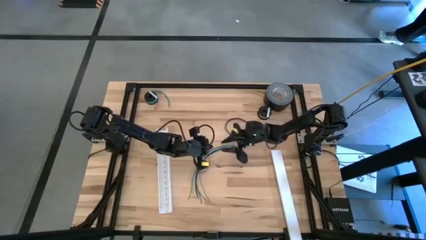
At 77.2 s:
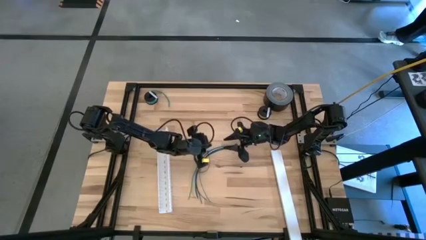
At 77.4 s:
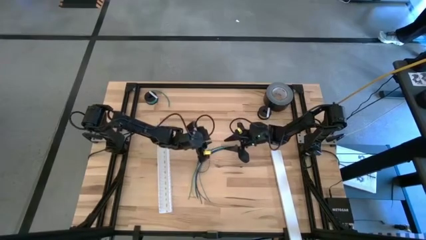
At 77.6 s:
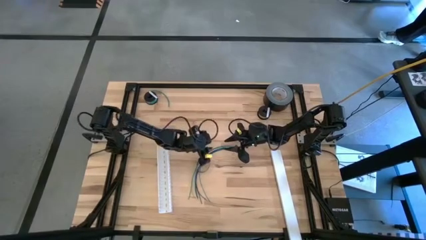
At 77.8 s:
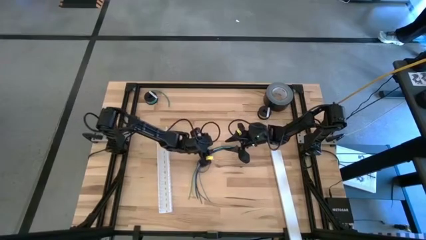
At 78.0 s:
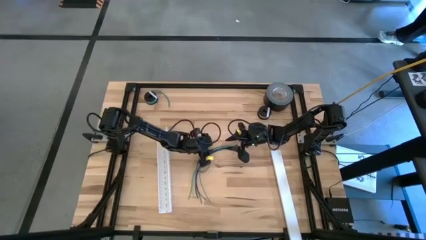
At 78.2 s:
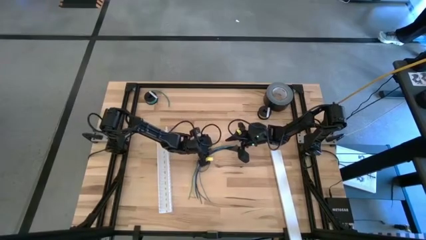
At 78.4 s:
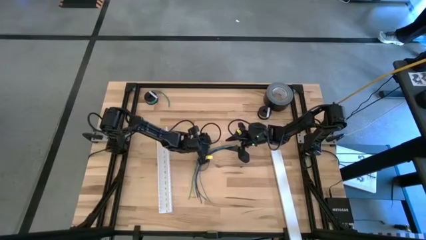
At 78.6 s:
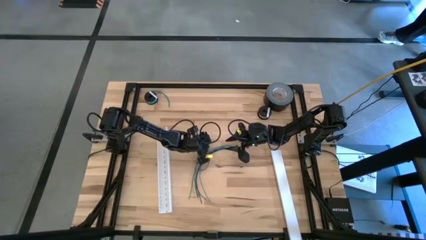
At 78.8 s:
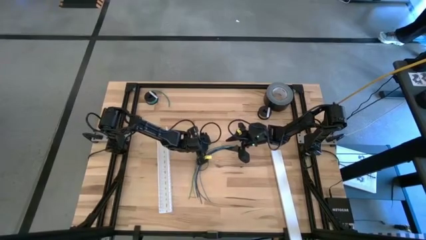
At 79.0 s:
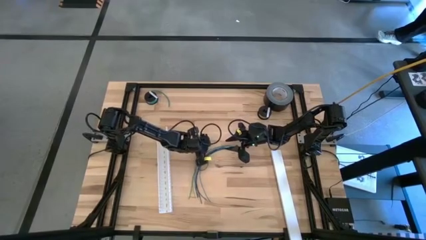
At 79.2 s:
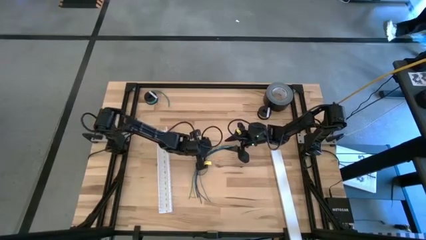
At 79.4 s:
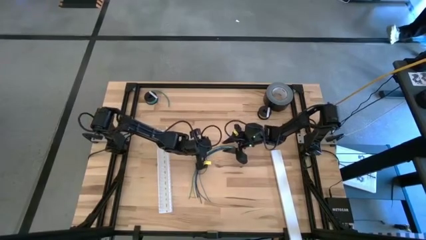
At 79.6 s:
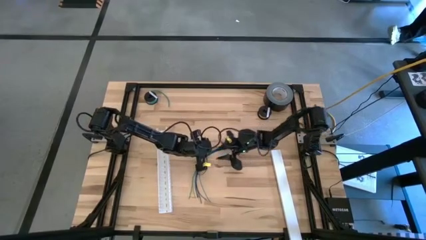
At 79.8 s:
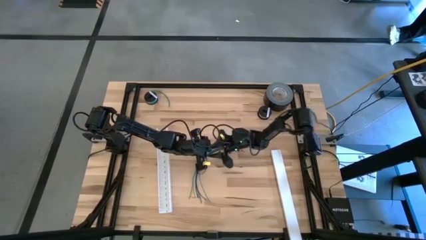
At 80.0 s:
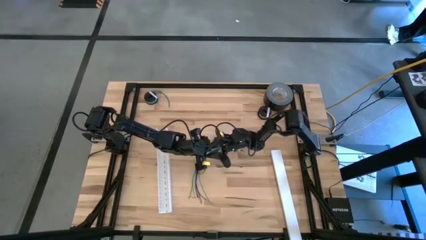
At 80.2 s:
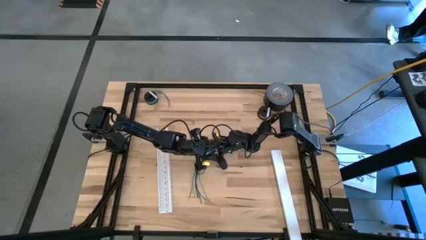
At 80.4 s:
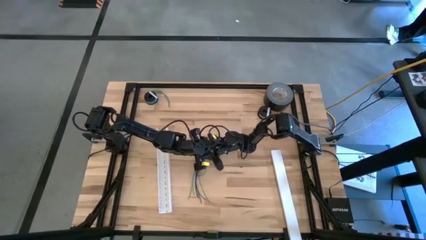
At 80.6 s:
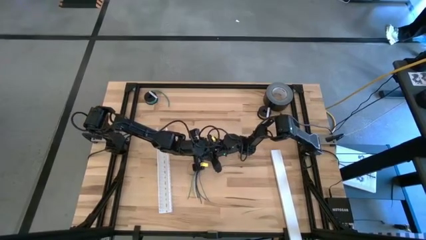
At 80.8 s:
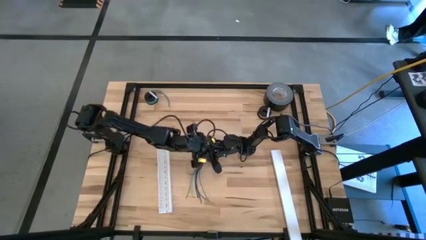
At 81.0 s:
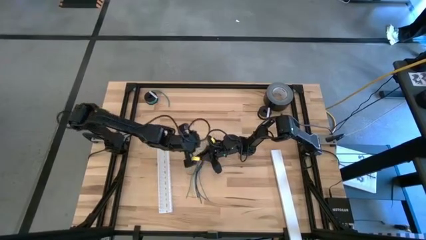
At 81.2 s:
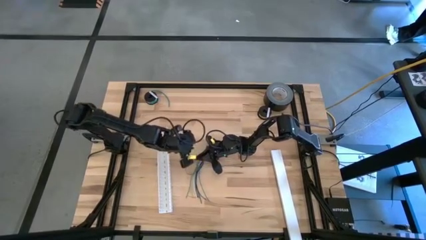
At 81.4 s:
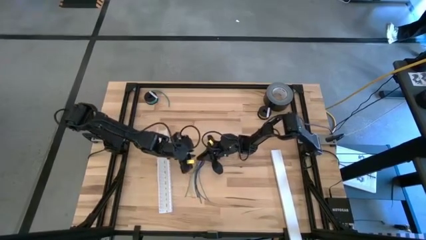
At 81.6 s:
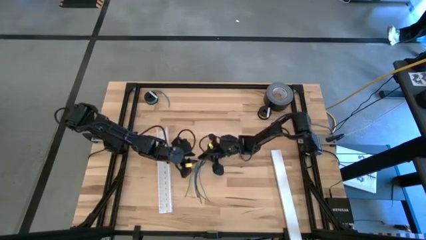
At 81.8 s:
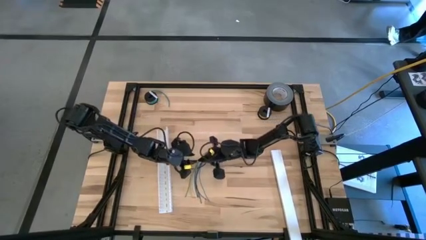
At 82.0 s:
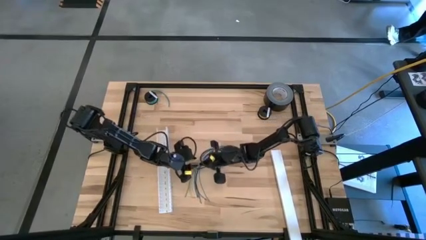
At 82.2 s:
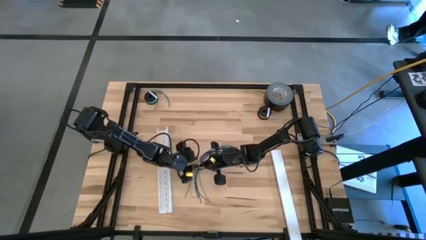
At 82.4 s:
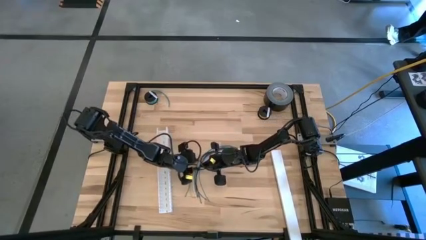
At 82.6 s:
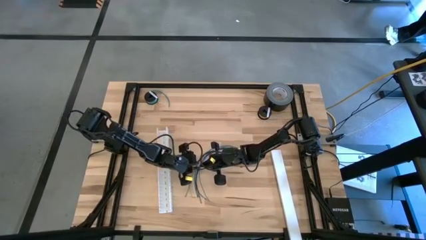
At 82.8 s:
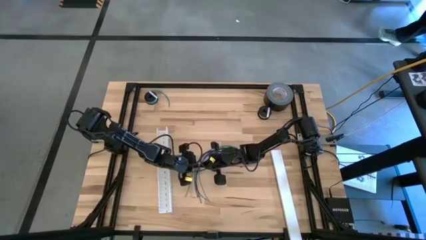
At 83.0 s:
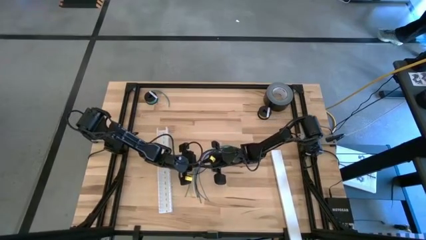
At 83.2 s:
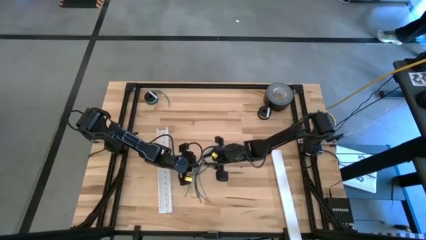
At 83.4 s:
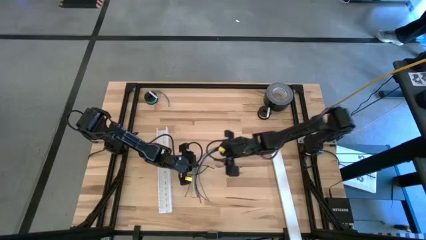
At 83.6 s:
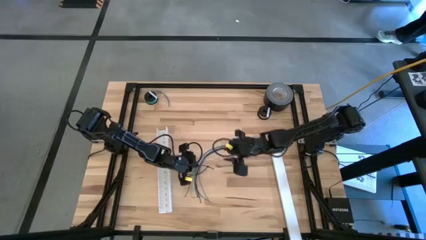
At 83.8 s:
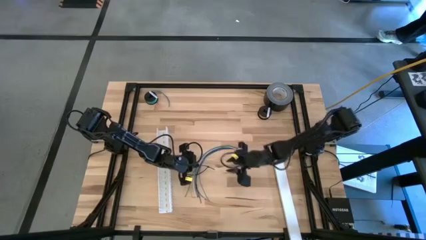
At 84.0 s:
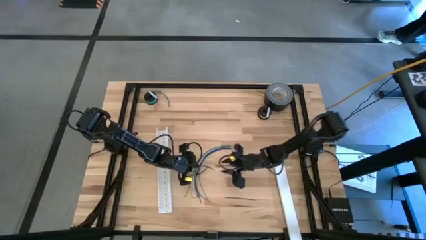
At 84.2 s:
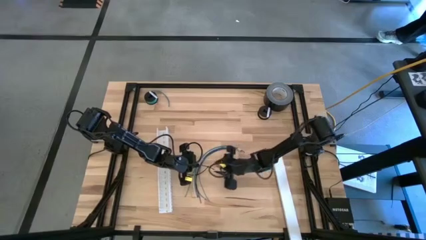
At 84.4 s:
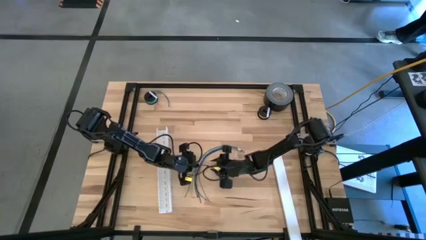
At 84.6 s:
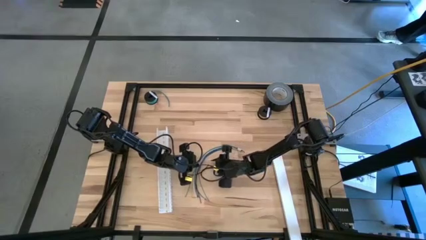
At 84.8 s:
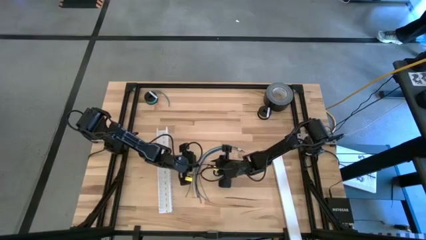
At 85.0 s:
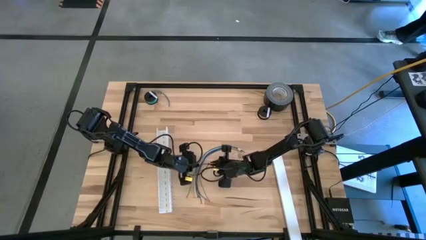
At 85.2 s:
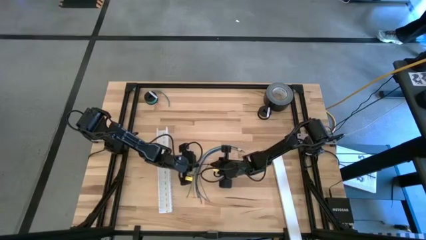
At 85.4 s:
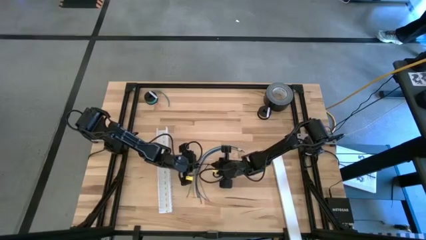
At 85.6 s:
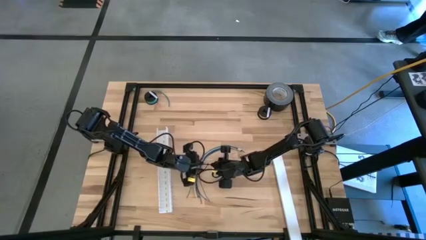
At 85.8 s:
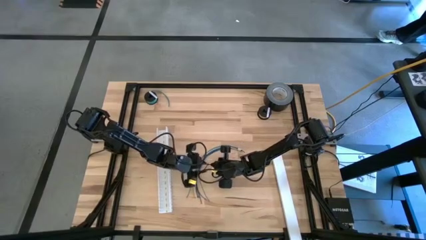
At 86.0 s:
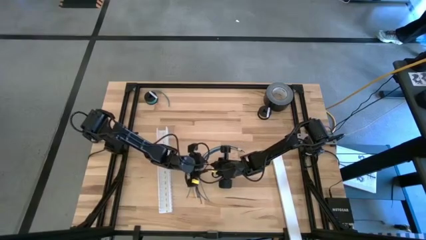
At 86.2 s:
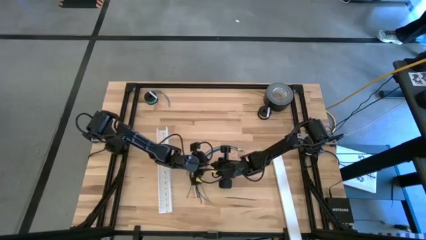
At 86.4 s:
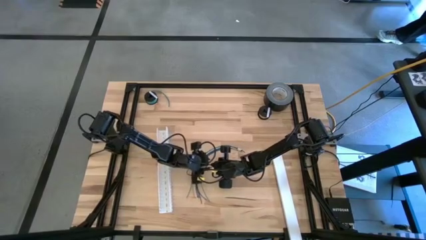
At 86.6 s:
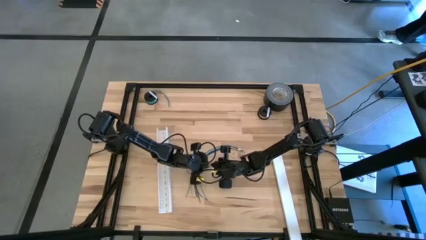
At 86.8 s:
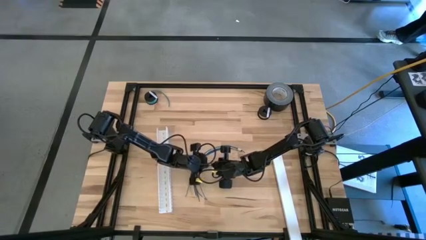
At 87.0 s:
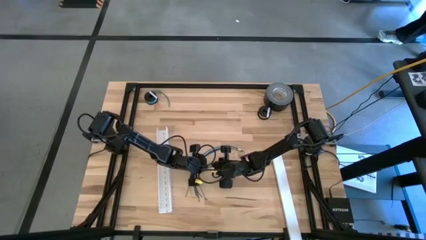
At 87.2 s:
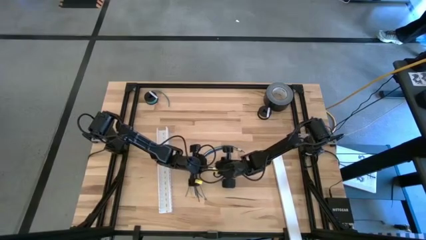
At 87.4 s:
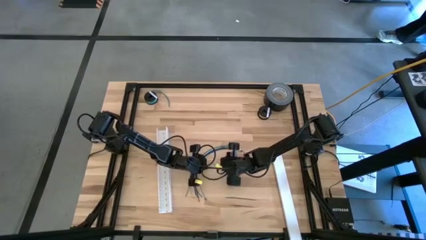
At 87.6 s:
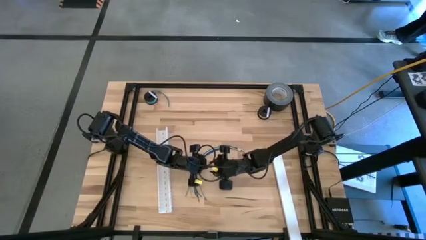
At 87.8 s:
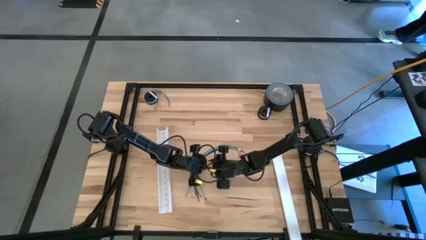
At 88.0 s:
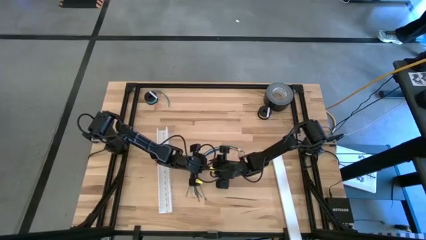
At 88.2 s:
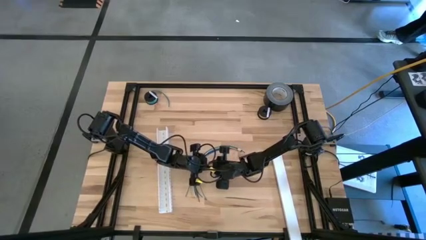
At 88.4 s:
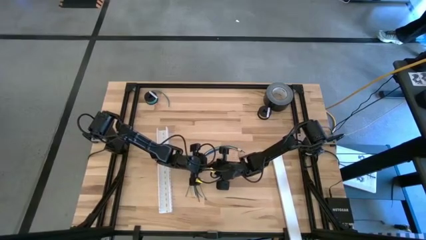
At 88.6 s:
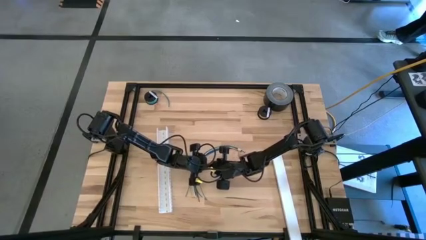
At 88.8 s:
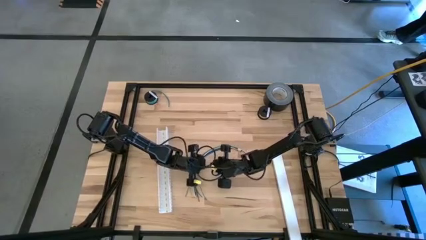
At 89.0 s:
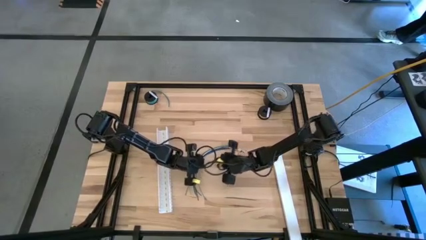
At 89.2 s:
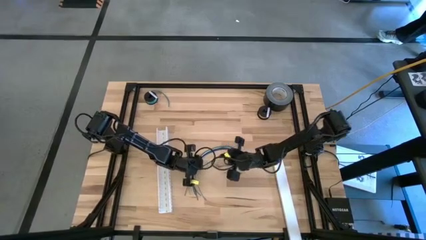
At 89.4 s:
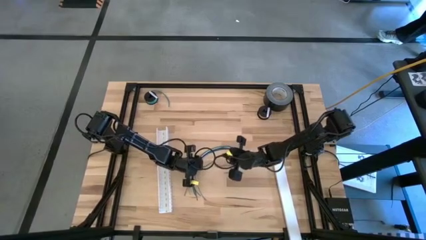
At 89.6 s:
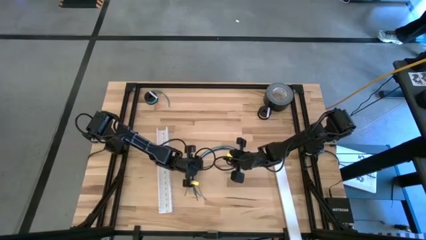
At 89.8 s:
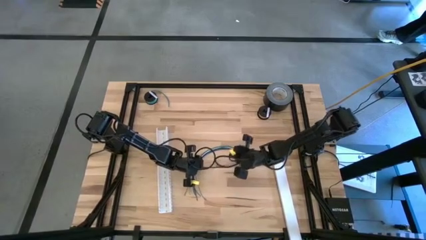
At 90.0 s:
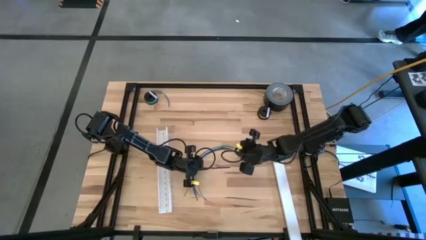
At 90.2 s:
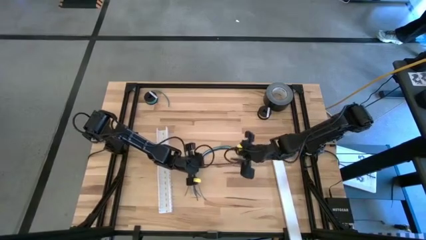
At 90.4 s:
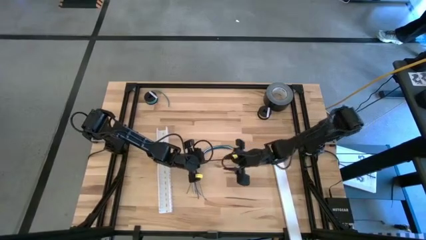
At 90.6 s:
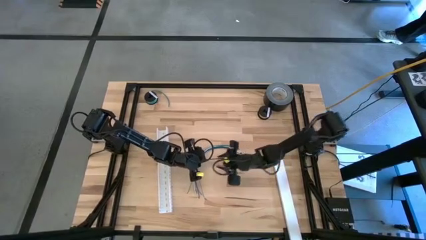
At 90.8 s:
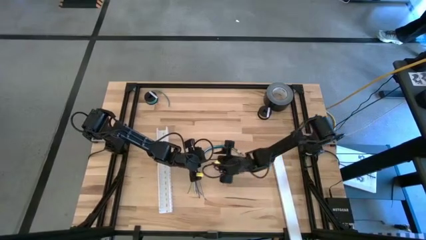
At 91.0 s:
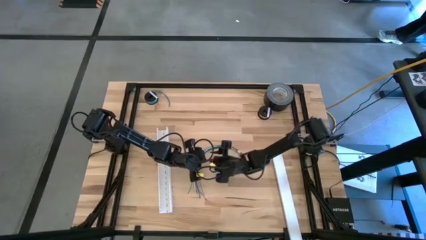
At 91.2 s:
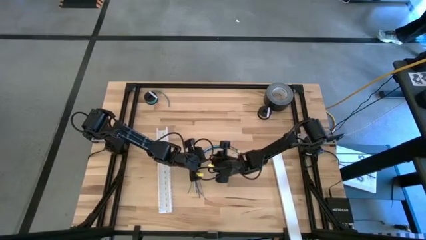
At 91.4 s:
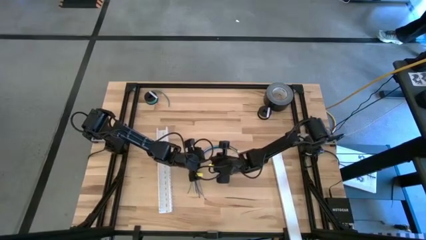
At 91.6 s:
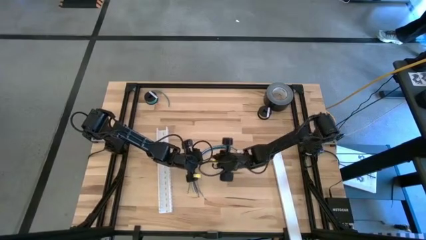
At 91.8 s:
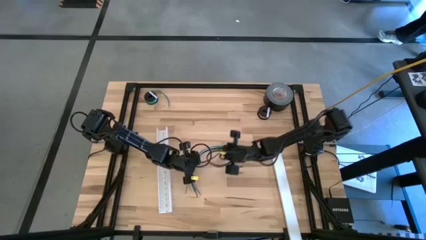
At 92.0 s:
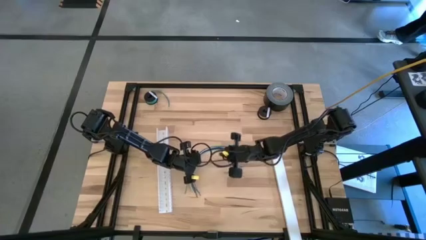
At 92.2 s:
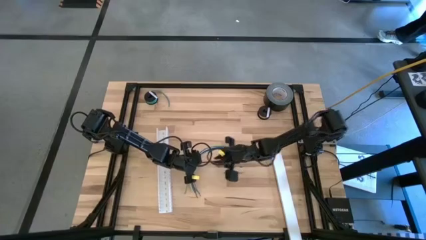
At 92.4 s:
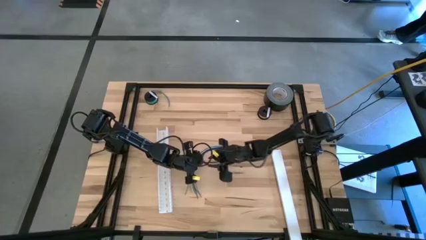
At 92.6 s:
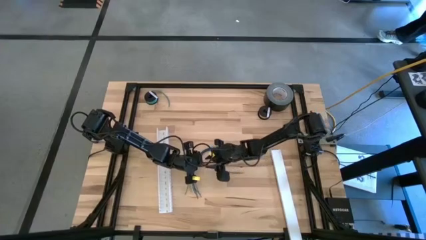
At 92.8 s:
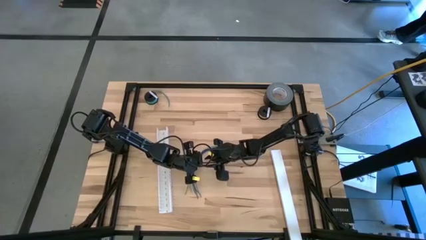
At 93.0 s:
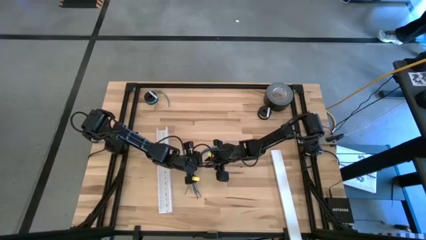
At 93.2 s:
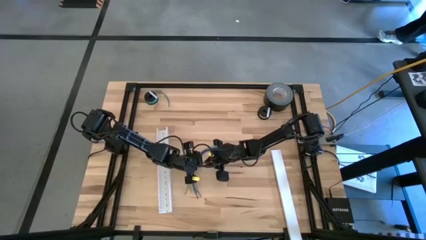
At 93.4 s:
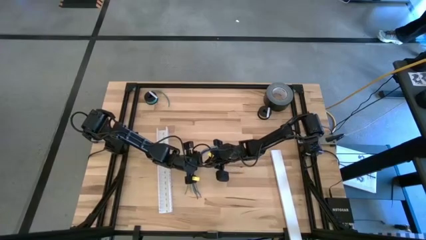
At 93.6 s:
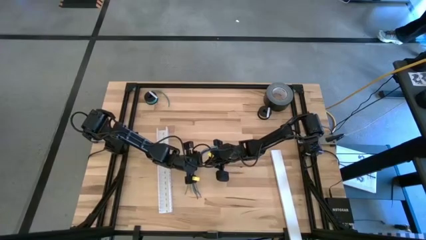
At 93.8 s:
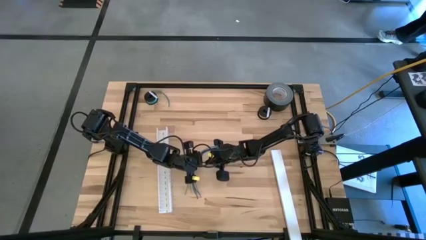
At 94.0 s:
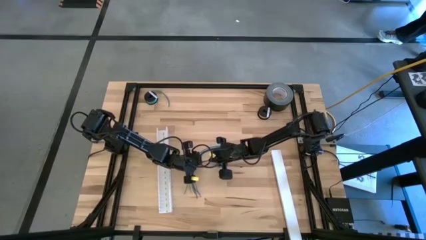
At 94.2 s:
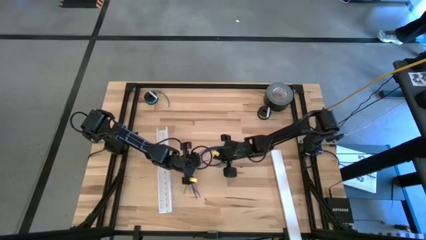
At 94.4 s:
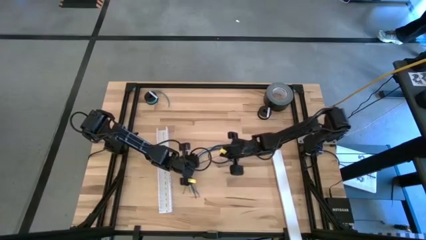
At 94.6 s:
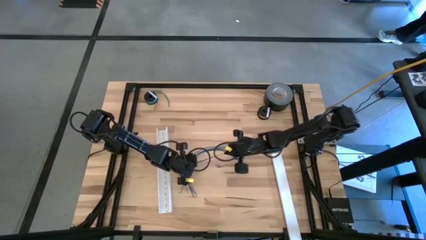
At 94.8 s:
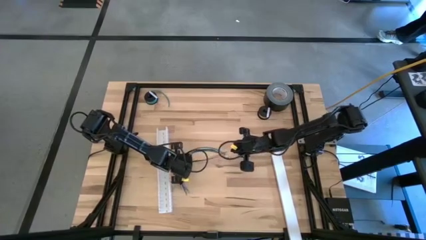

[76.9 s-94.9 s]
Task: Ziptie cables
Wrap the colored cables with the black zip tie
